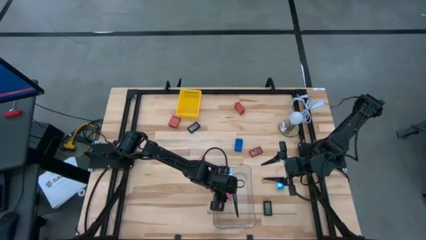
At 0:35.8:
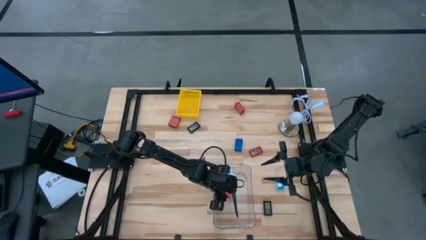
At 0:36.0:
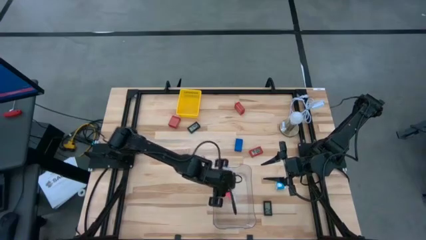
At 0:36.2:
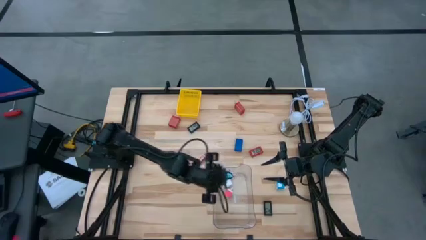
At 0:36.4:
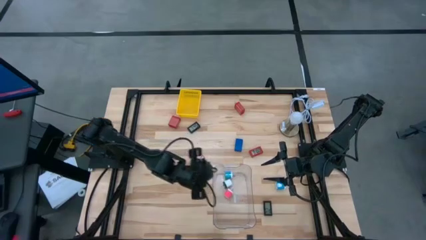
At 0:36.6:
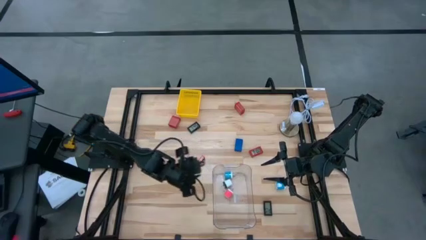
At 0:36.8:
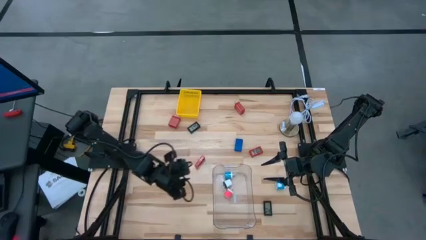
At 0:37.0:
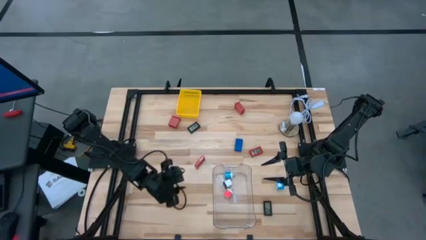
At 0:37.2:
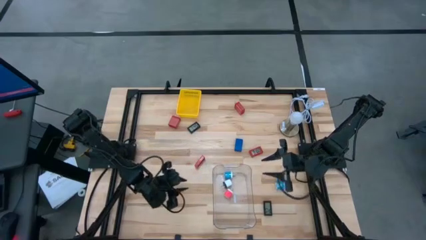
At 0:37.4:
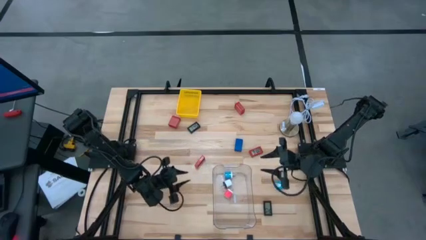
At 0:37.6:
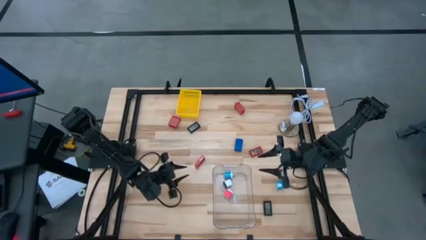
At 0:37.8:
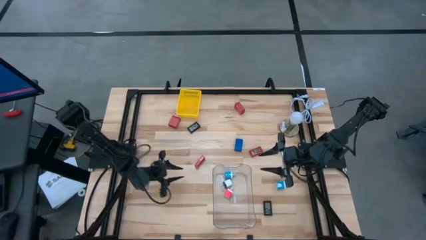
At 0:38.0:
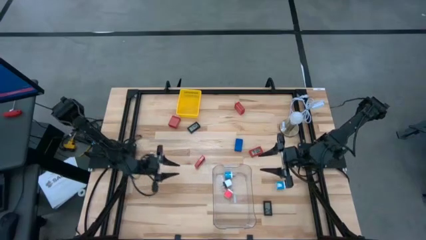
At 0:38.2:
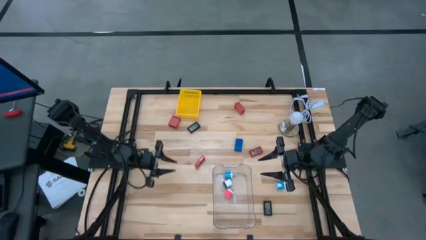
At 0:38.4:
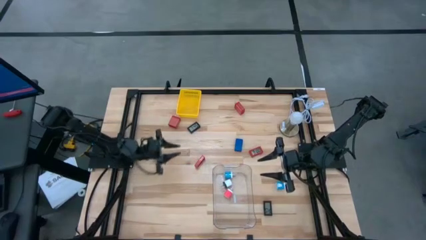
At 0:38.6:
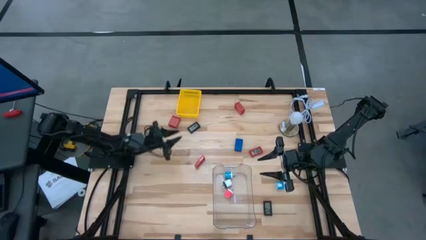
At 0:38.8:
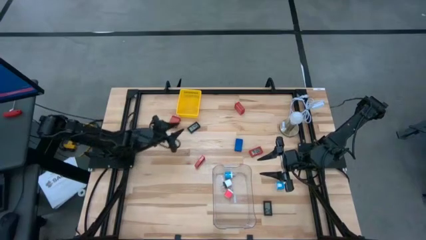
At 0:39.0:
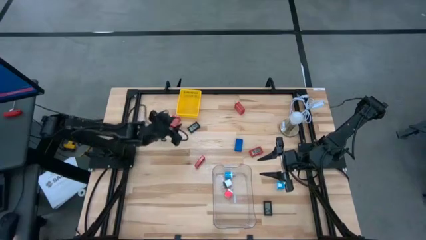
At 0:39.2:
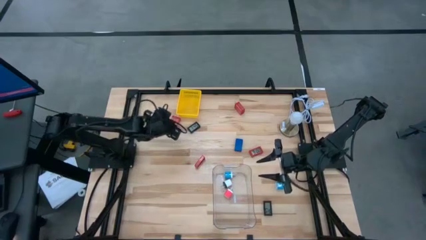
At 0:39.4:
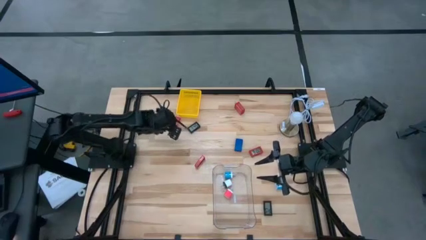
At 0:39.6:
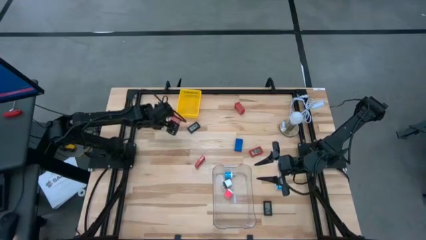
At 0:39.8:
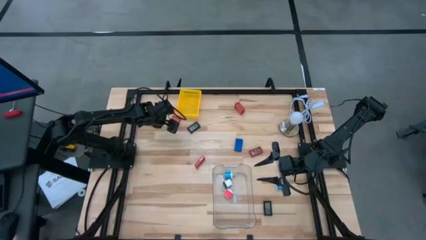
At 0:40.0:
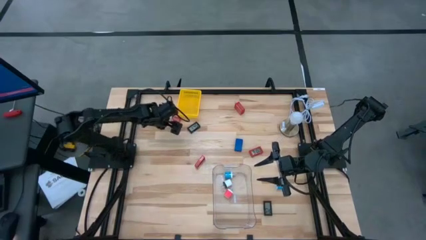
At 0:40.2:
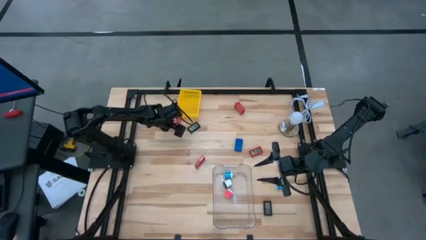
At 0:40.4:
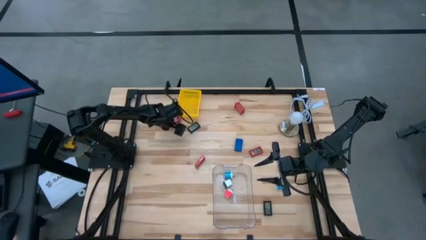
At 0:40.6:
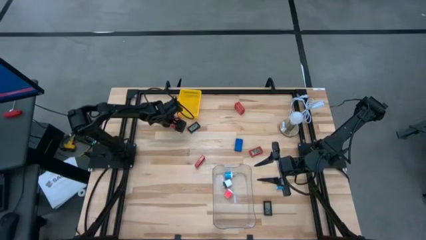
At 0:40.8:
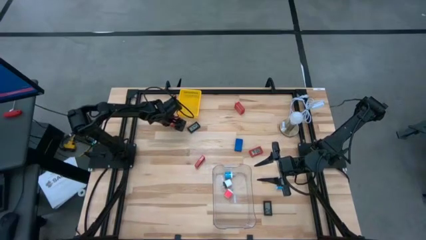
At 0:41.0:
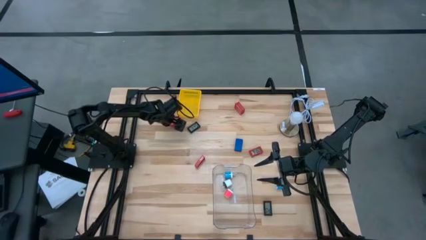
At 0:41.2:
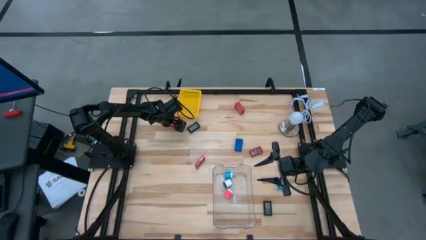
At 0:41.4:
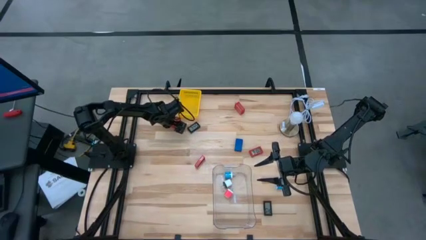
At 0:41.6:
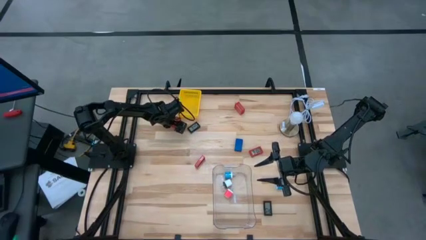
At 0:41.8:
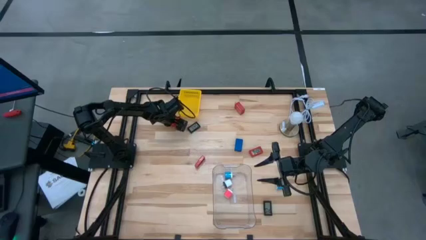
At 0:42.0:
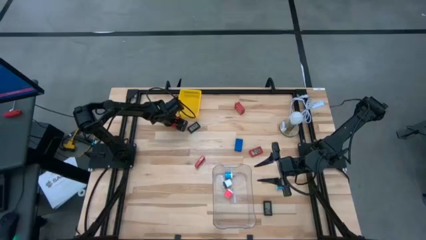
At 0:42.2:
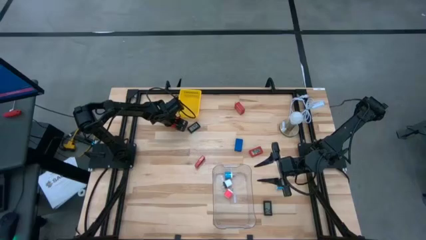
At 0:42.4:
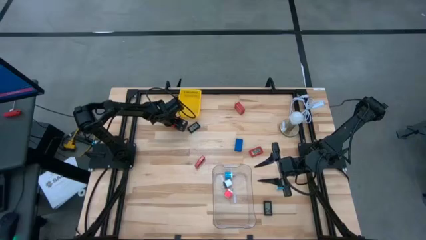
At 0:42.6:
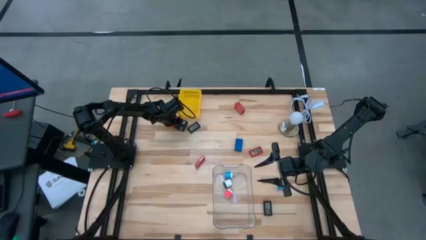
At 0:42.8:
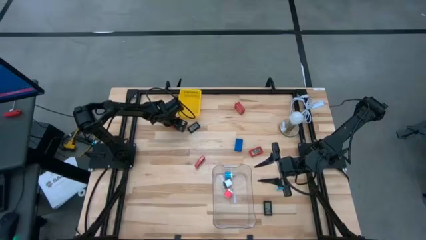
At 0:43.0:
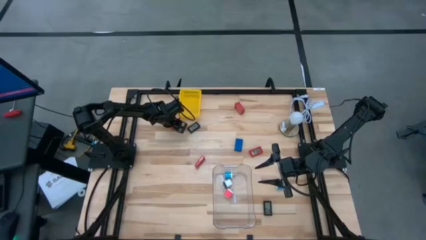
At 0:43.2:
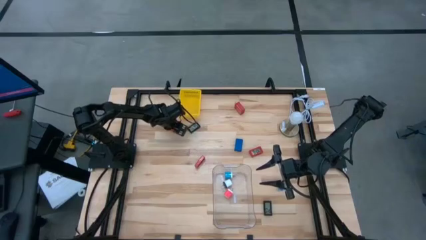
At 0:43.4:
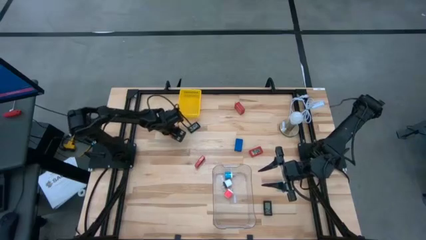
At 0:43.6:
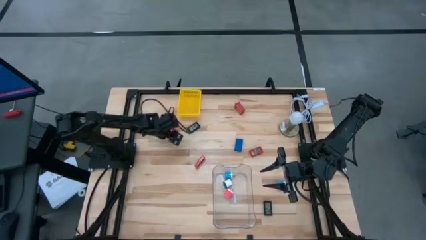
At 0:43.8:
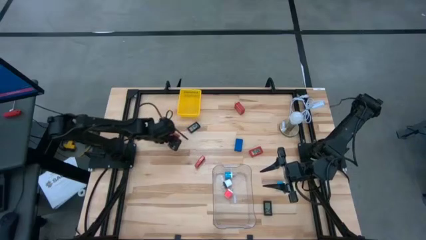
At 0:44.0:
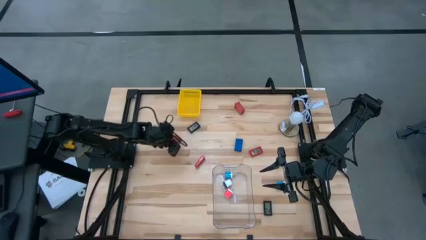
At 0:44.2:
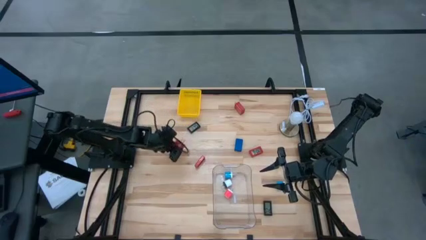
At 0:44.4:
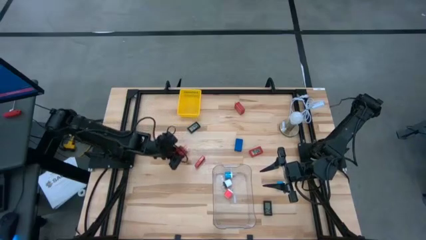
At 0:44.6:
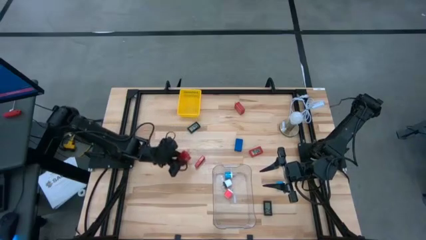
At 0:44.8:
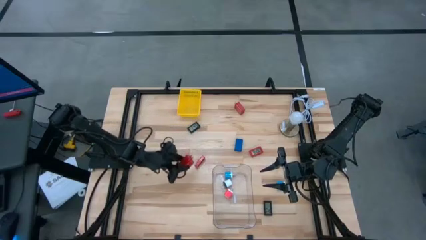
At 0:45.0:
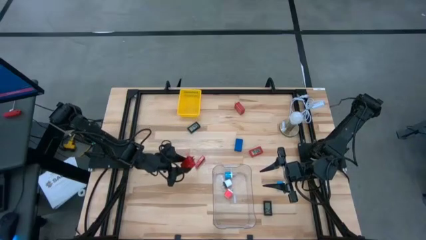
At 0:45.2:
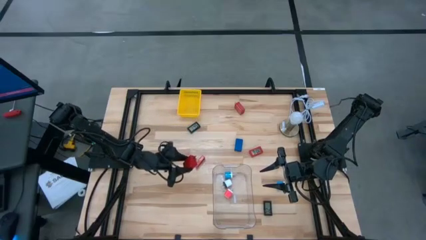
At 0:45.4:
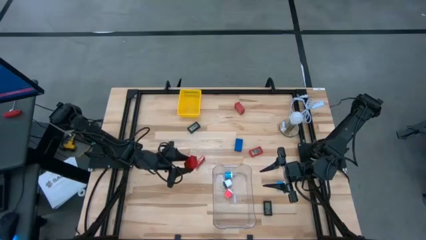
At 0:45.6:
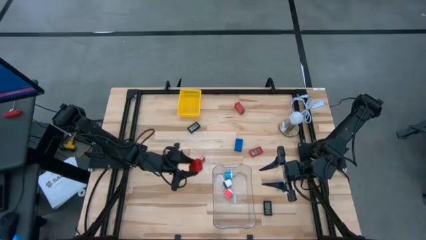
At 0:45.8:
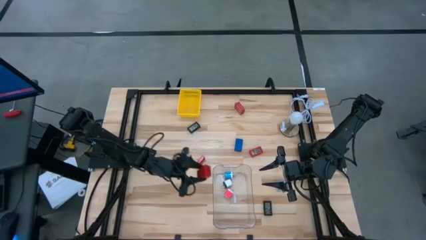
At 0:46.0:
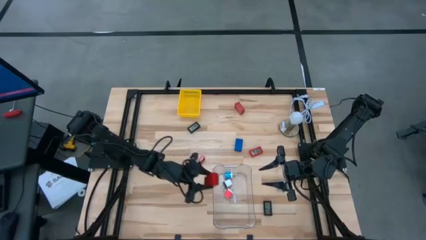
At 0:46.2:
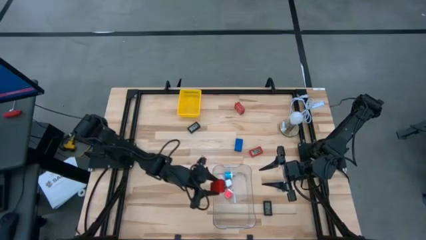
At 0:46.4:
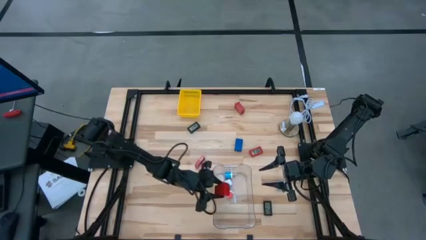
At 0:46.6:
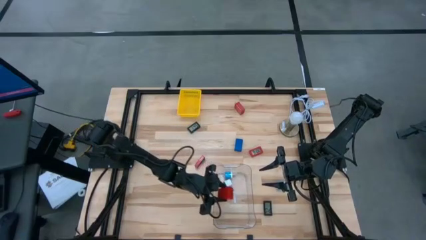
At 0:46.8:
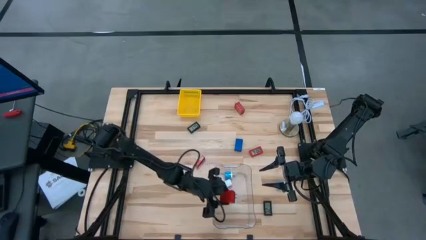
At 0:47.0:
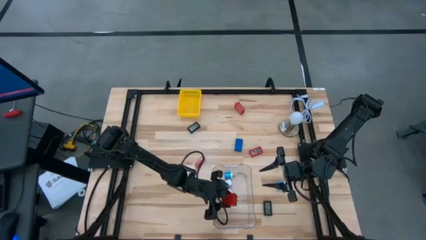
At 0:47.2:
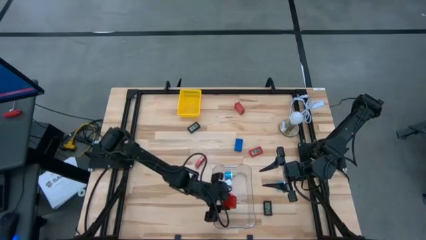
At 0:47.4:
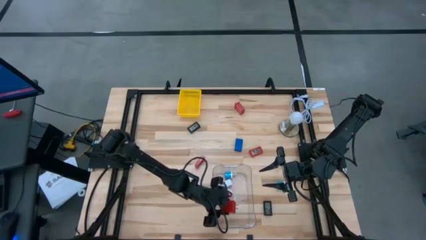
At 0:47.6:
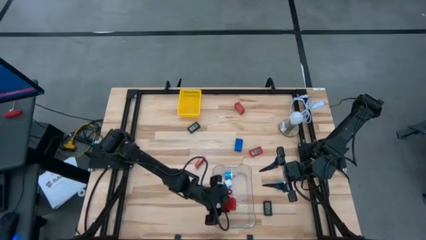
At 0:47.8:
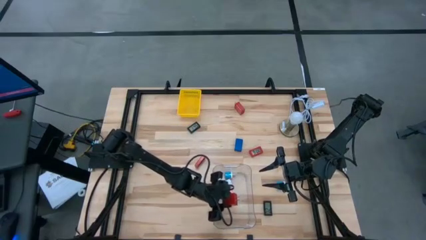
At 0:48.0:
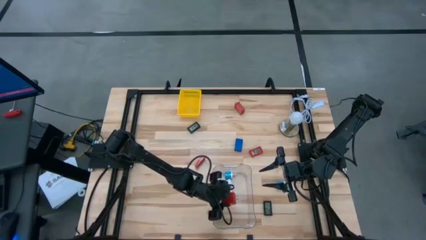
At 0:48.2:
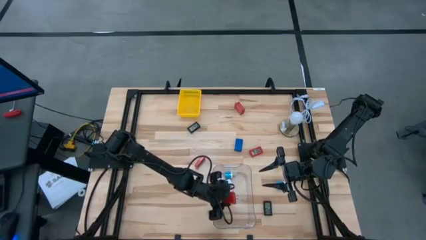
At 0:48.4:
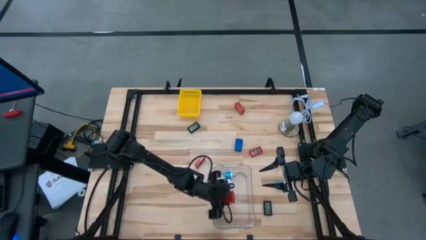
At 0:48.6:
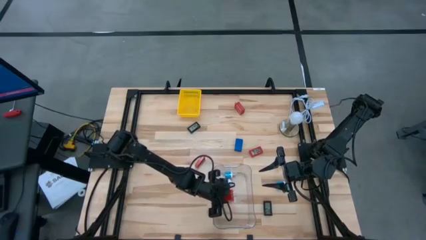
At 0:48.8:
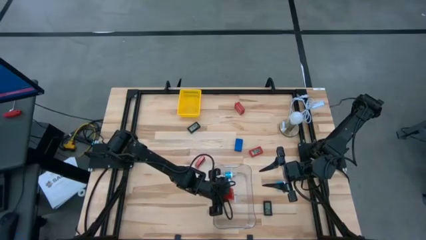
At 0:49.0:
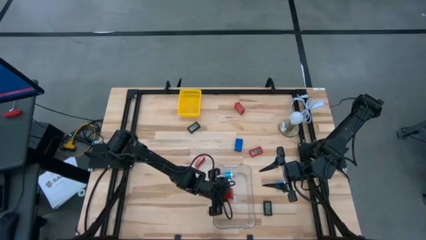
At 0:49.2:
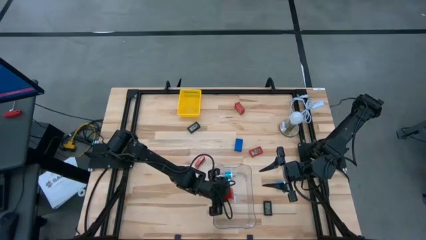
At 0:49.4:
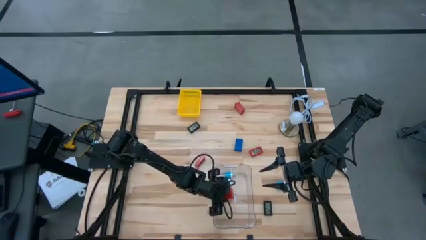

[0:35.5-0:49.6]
Task: Pick & Place Office items
Put the left red power adapter into the clear bin
